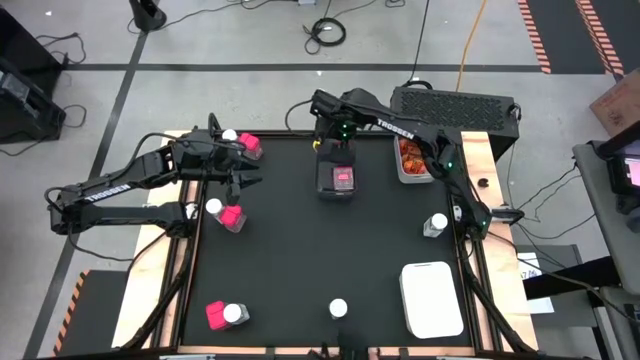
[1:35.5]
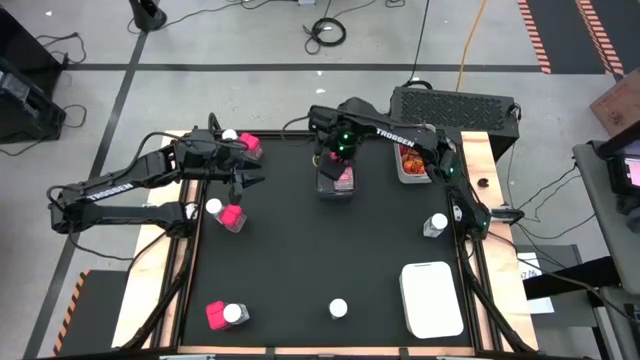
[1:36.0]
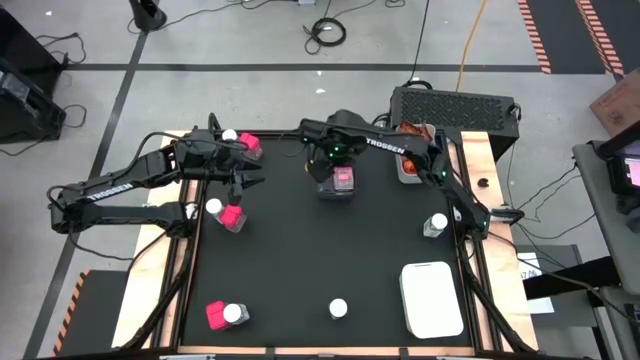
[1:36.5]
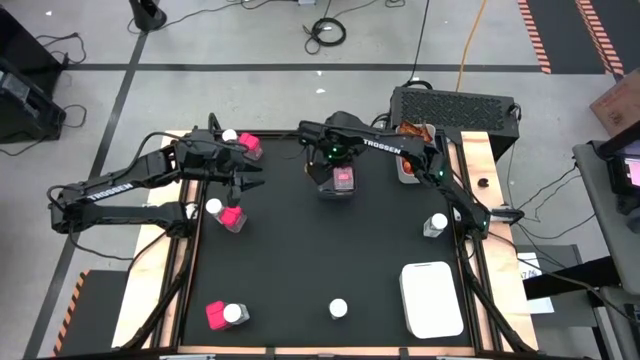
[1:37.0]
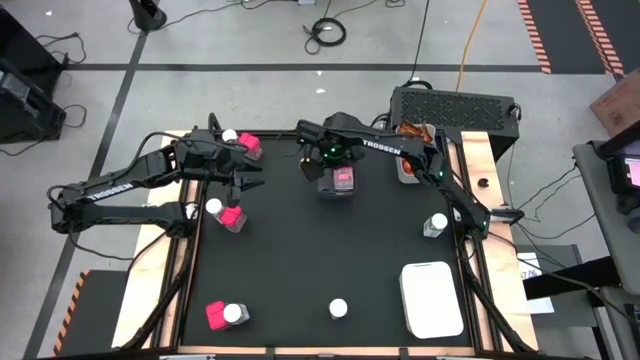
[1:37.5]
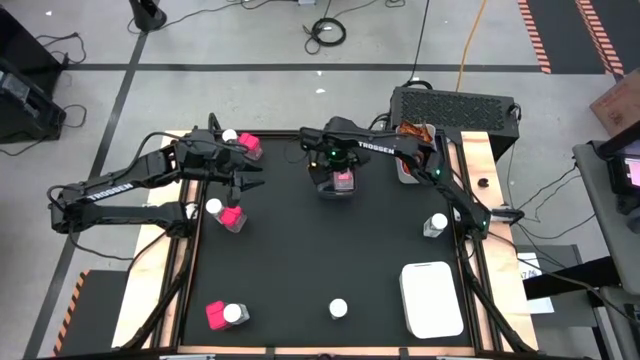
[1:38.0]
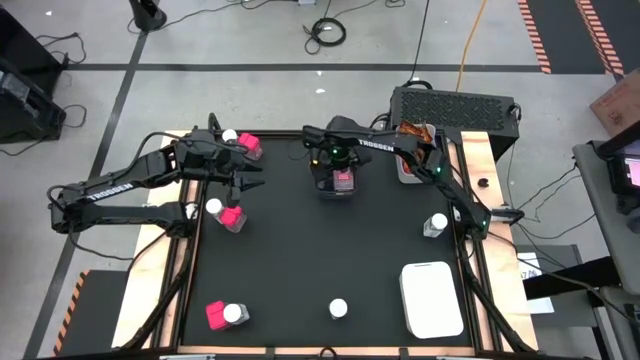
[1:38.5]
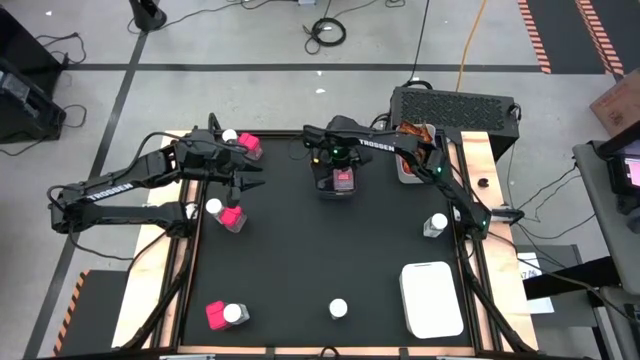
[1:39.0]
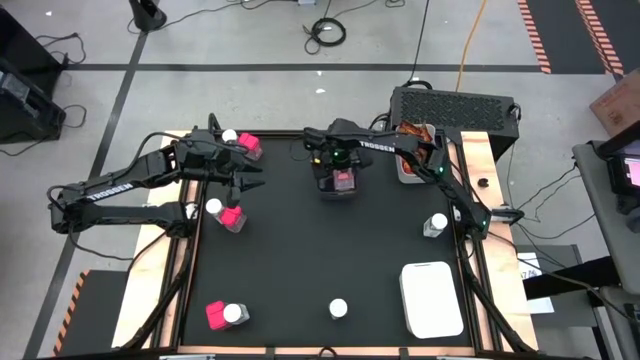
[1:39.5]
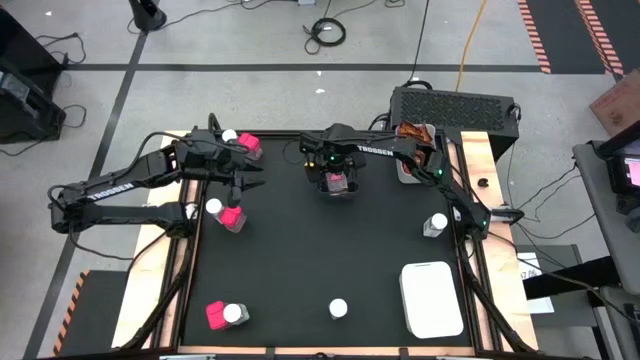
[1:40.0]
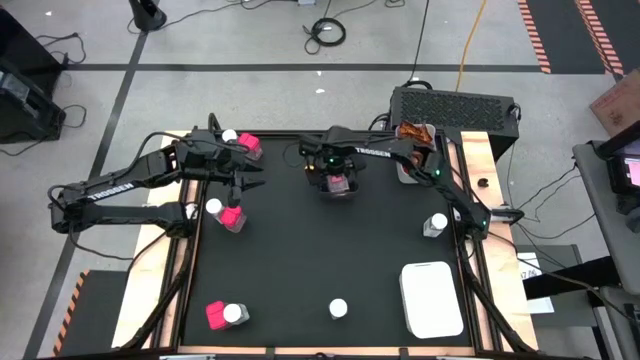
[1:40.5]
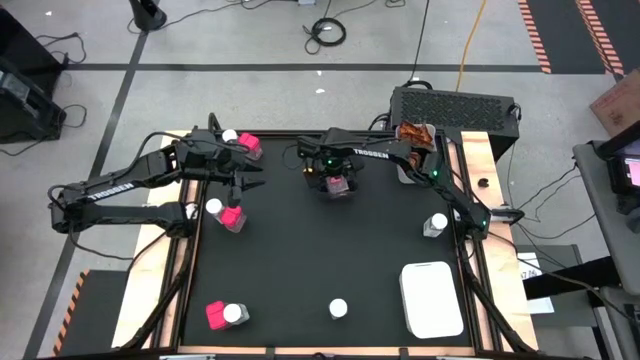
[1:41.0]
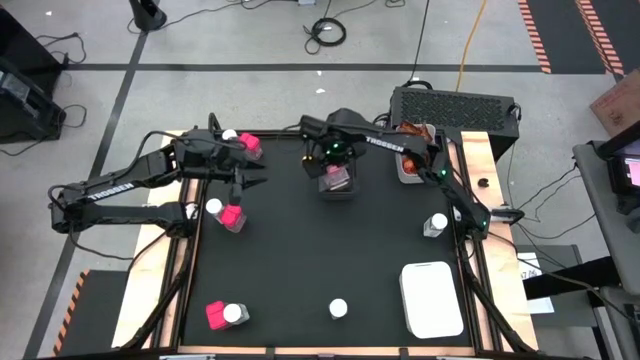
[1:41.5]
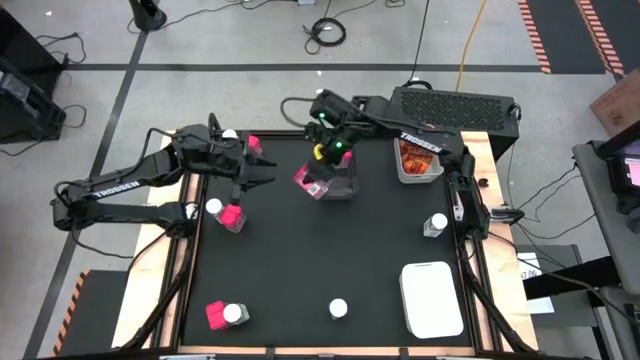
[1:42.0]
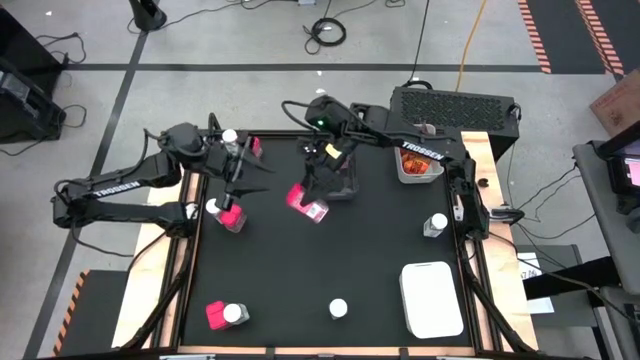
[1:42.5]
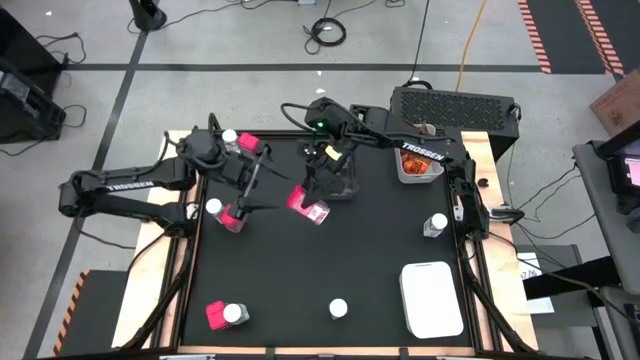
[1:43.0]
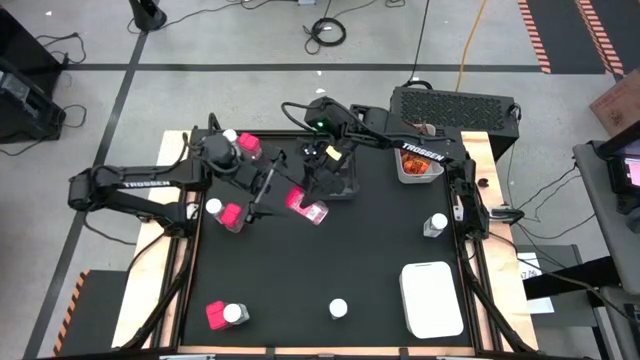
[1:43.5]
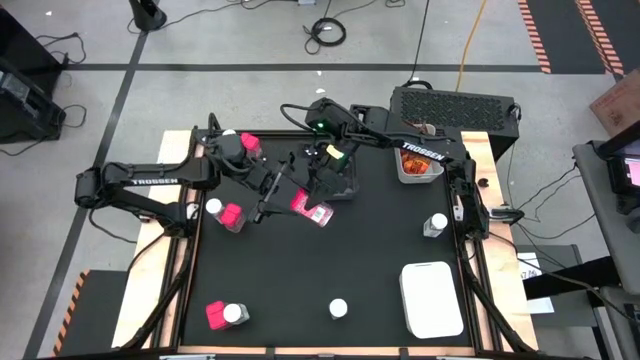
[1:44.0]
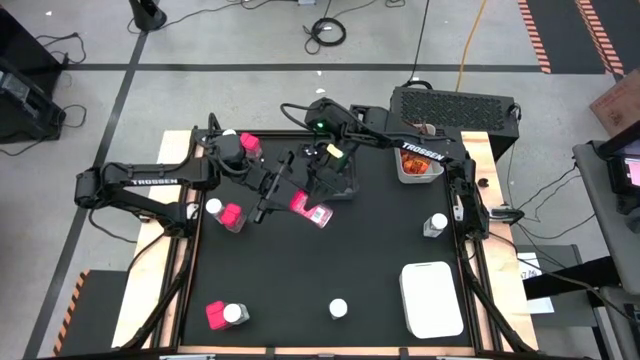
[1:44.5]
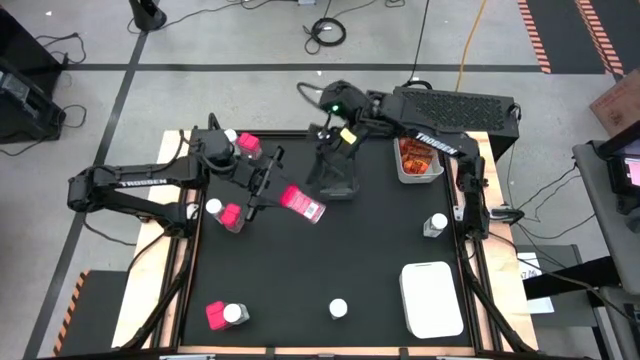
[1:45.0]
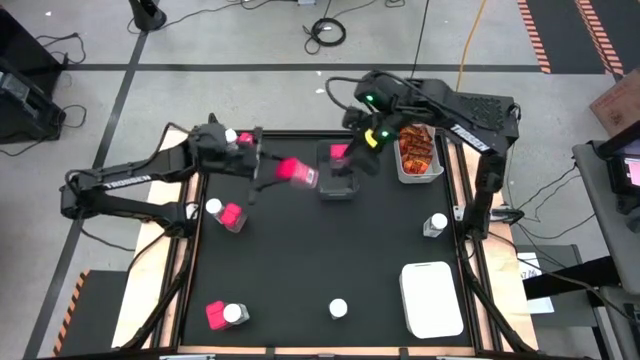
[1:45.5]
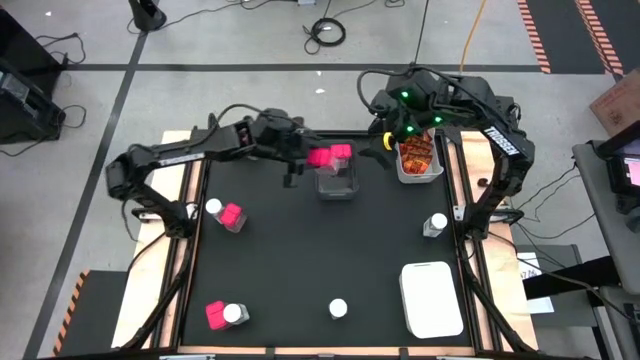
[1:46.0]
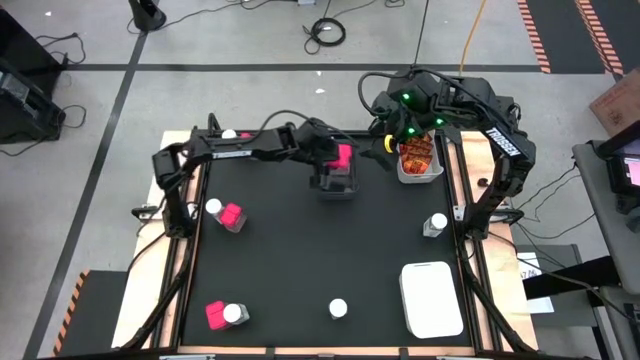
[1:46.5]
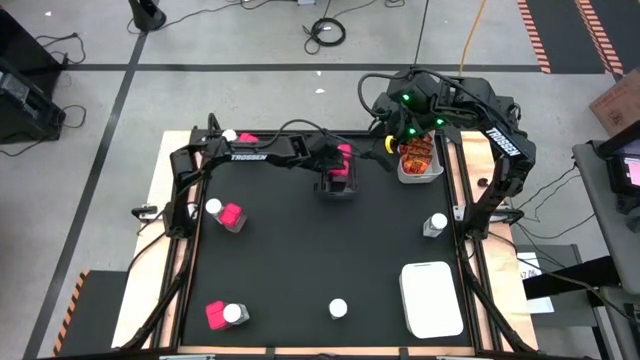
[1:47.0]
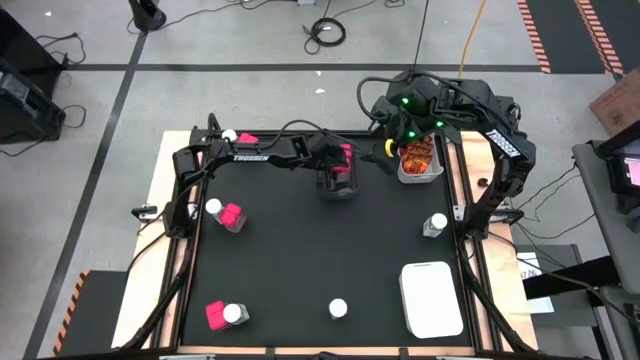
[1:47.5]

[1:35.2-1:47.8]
Task: Sort spices by type
Adjust the red seasoning can in the black transparent bin

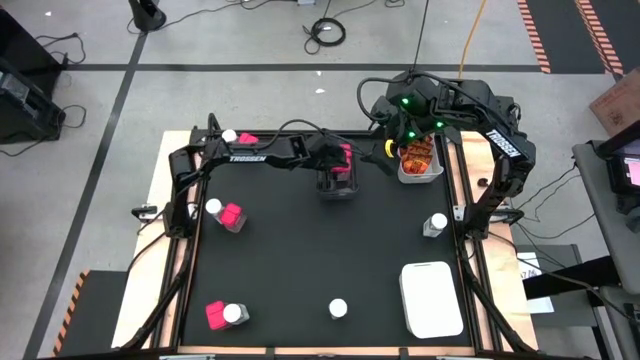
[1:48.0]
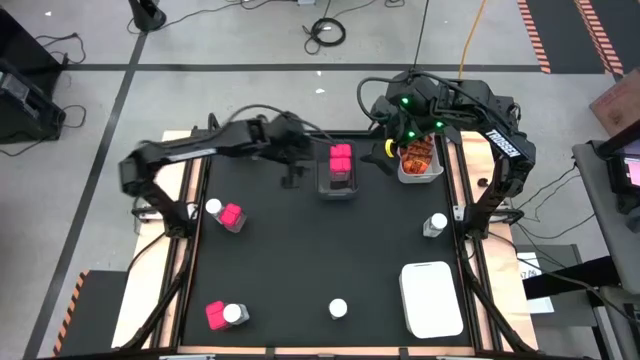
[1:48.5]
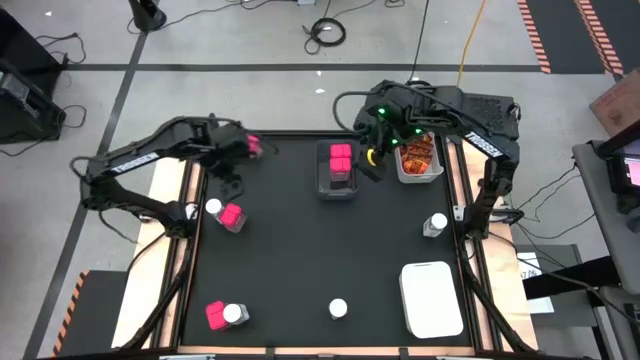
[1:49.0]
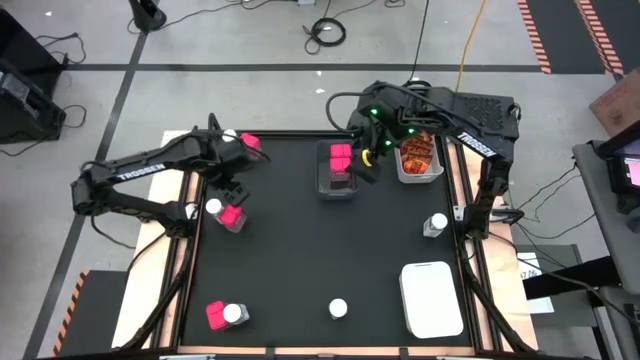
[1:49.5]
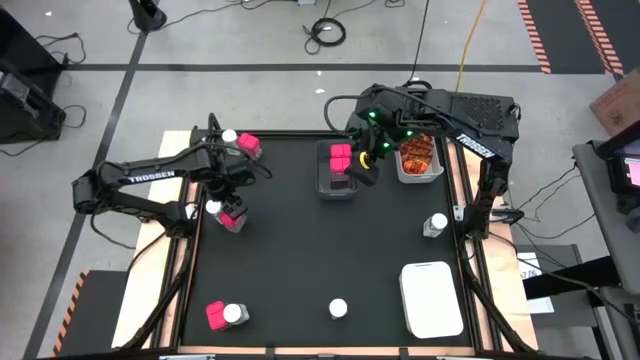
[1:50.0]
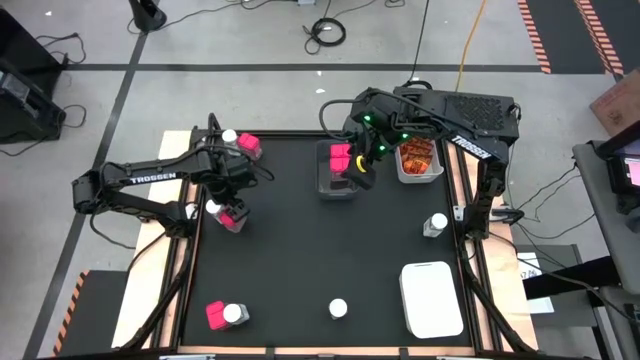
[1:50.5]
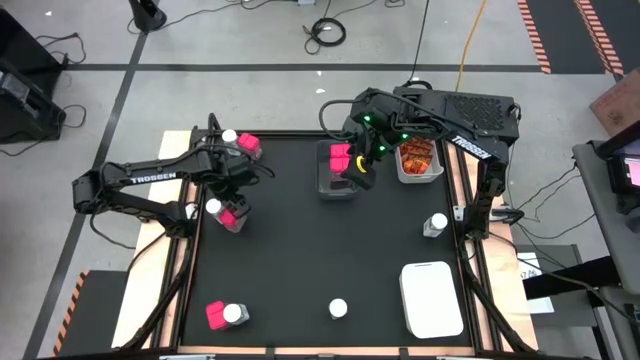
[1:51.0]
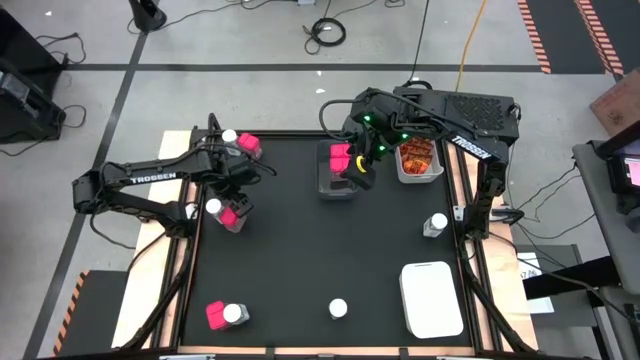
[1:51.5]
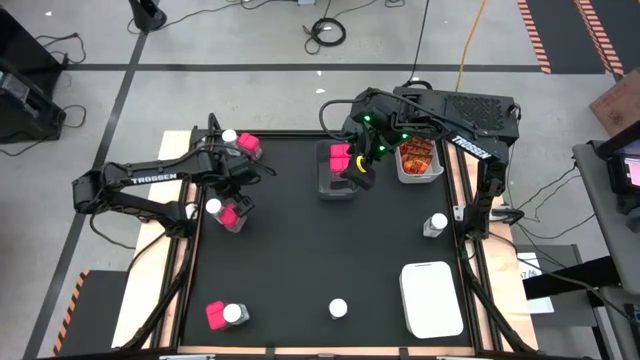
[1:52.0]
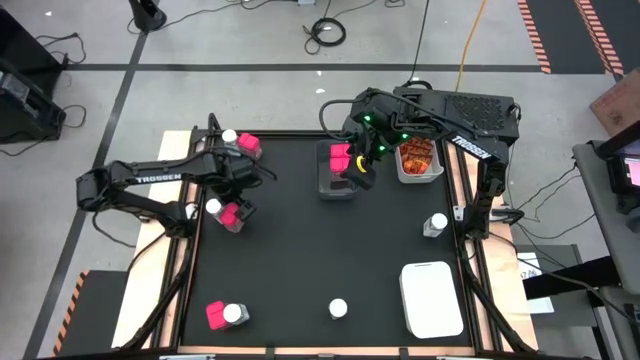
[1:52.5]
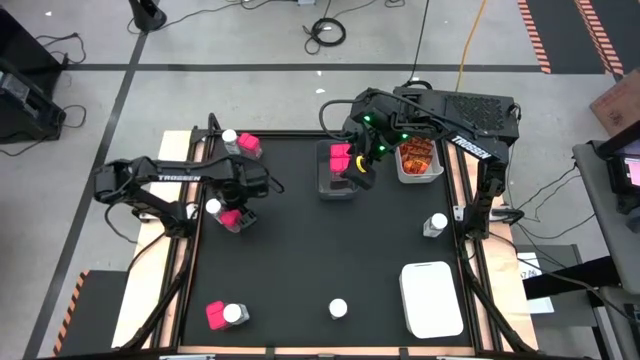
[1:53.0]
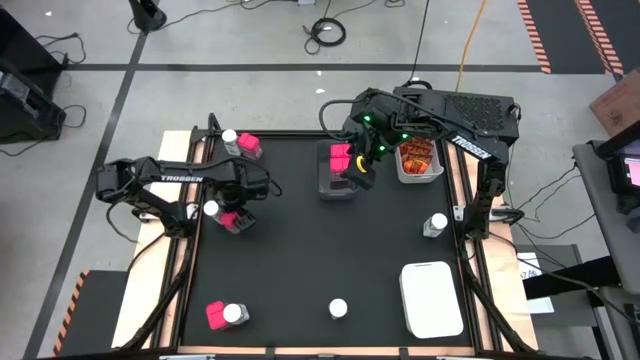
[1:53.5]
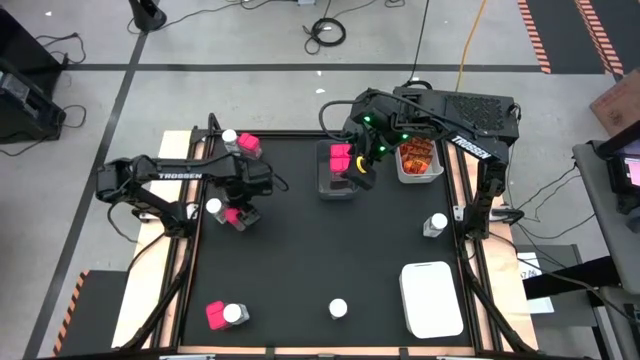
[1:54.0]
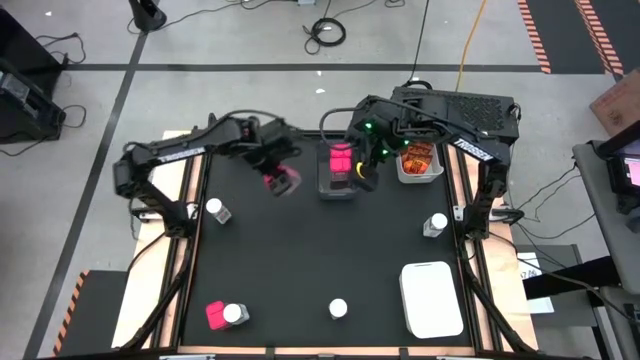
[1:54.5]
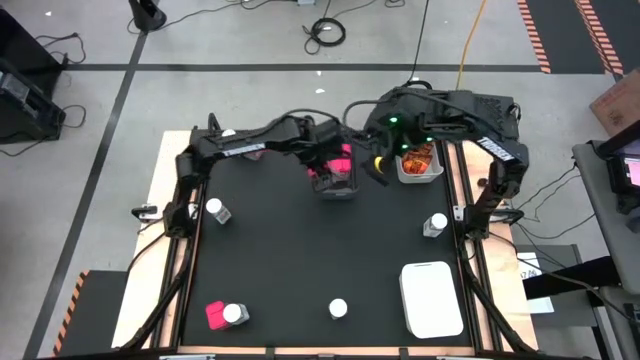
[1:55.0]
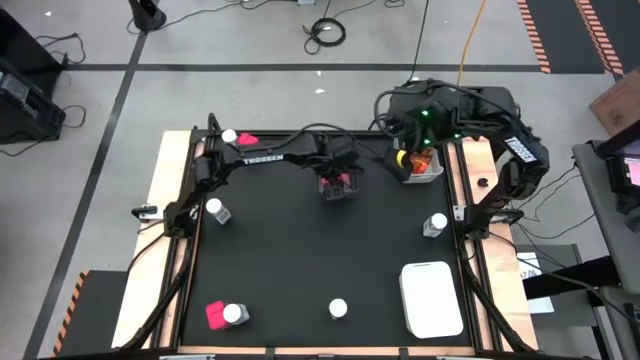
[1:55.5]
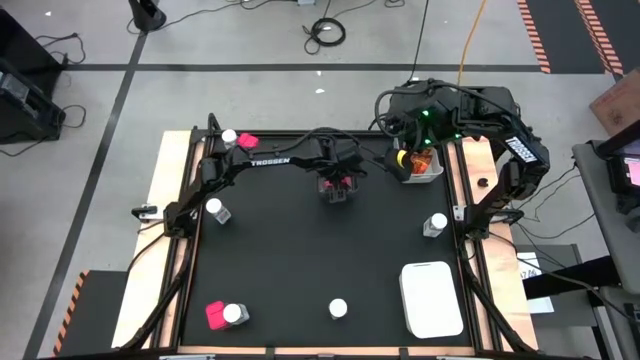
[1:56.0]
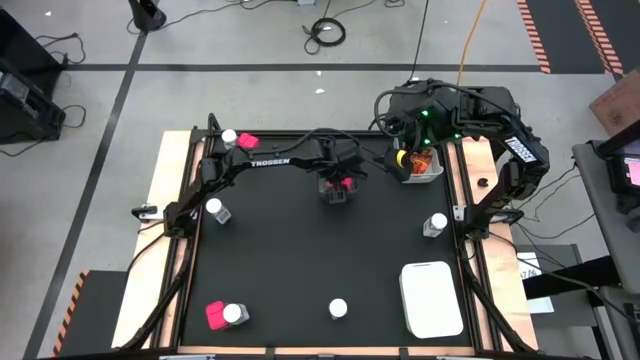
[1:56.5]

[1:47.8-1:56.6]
Put the red seasoning can into the black transparent bin
